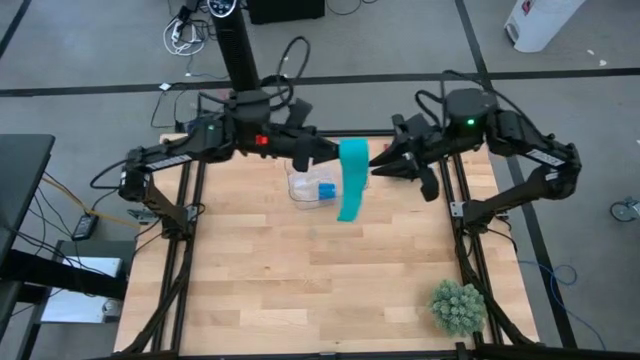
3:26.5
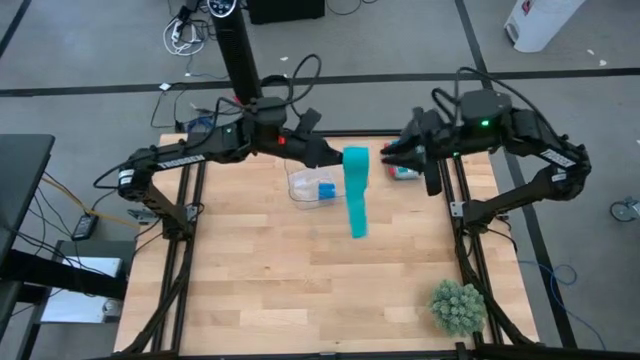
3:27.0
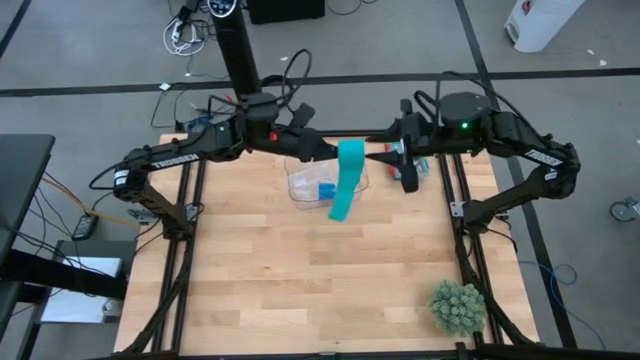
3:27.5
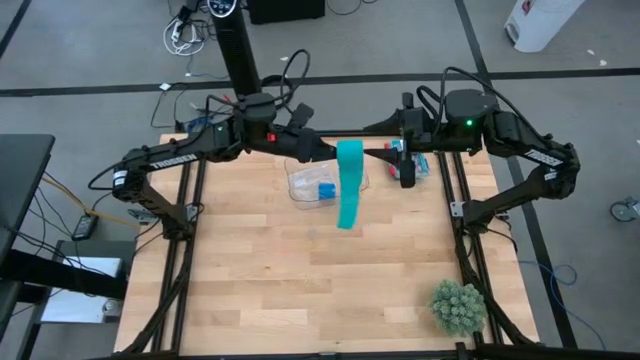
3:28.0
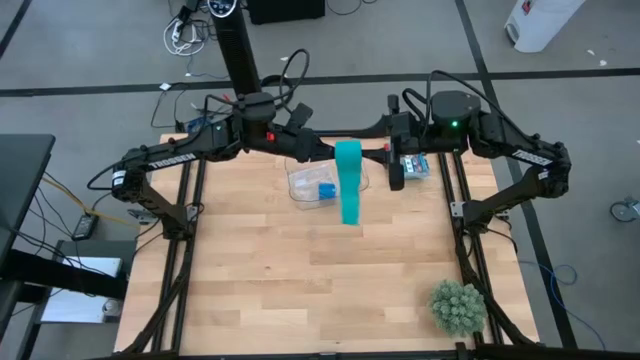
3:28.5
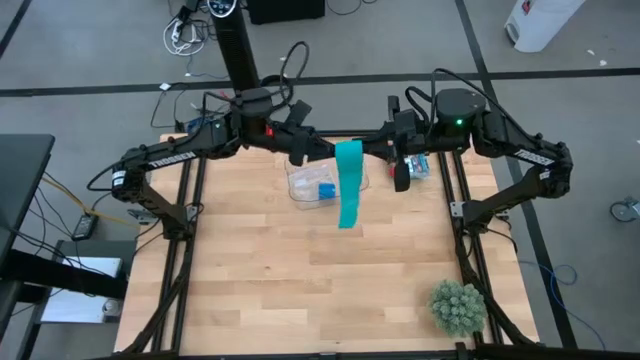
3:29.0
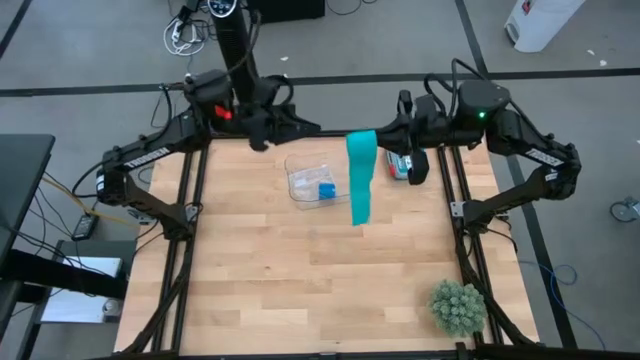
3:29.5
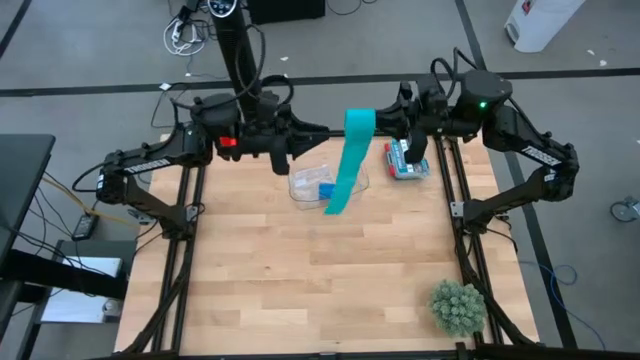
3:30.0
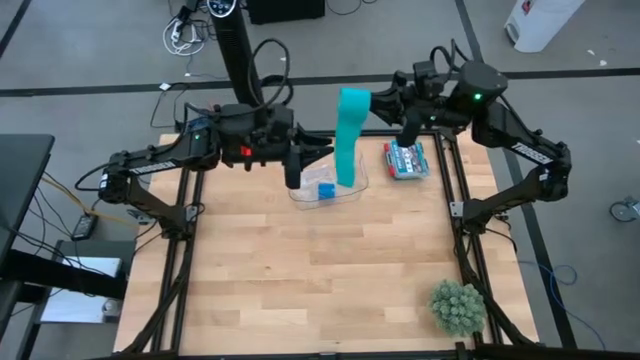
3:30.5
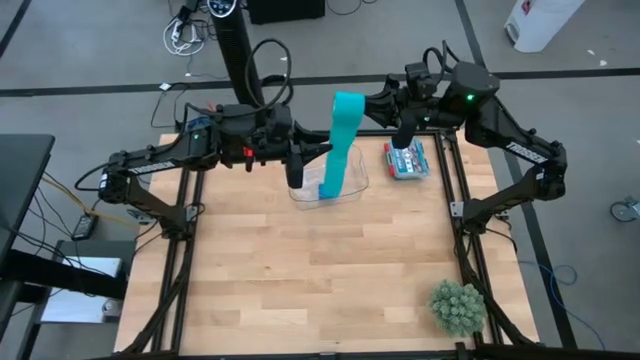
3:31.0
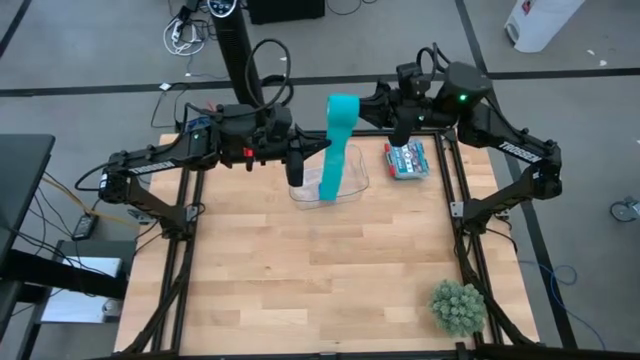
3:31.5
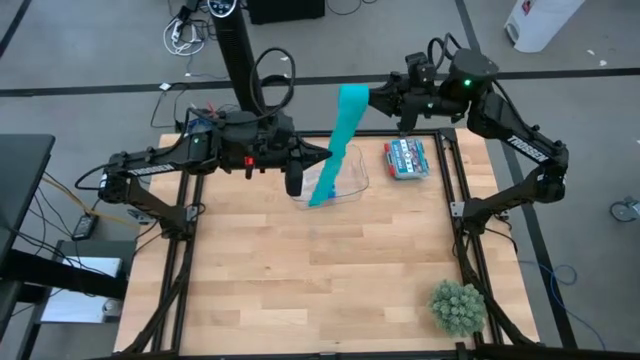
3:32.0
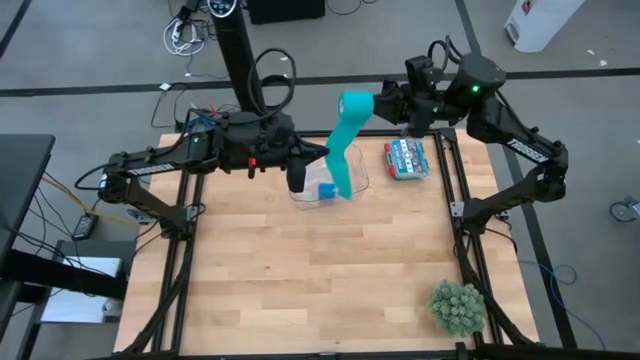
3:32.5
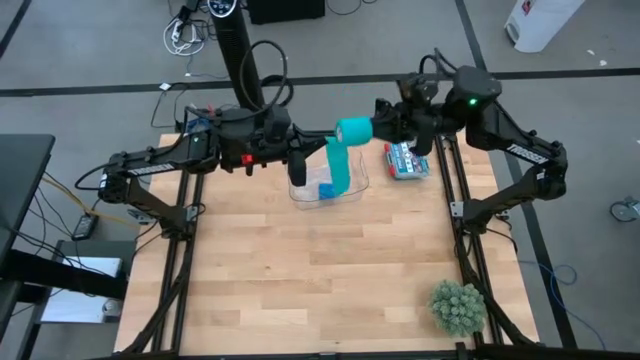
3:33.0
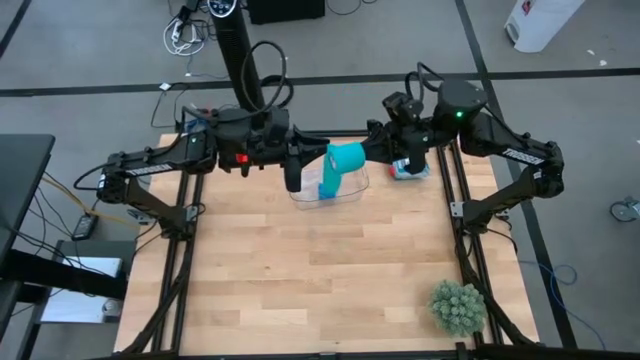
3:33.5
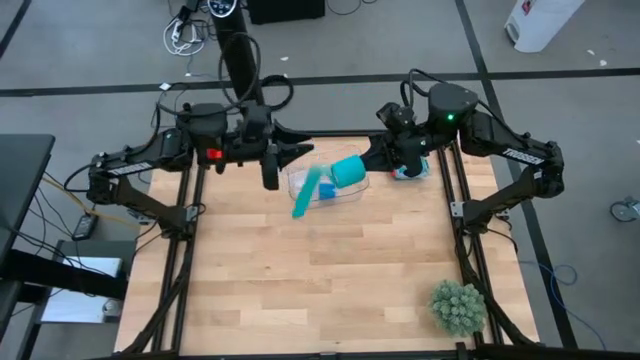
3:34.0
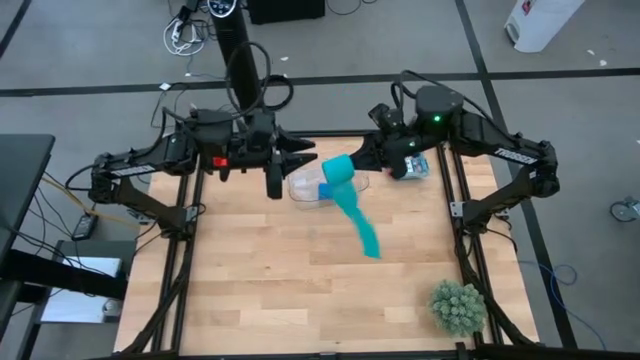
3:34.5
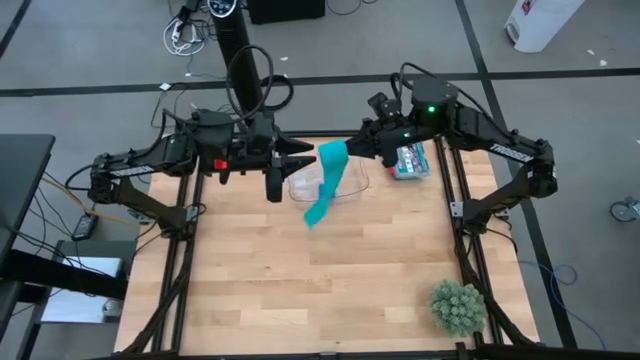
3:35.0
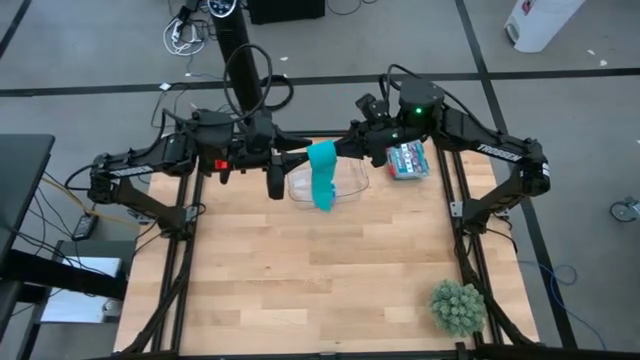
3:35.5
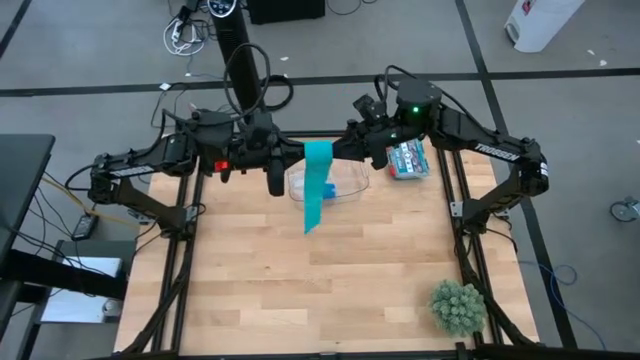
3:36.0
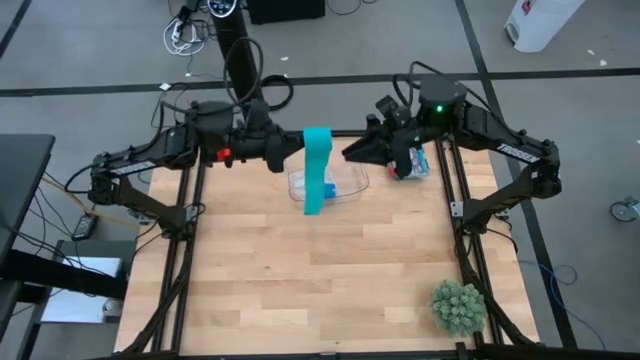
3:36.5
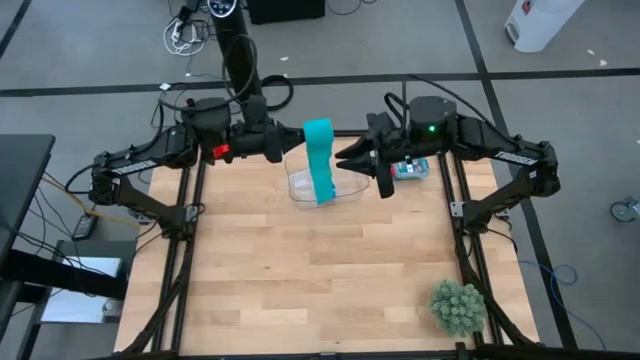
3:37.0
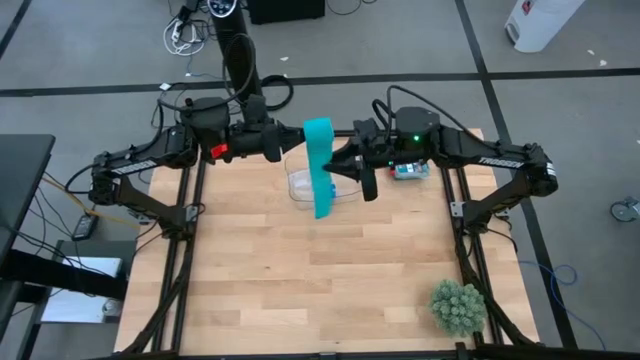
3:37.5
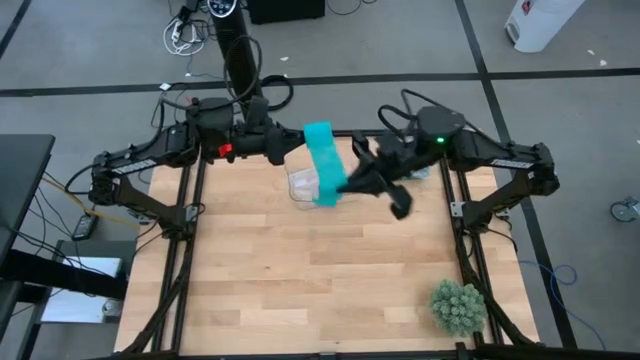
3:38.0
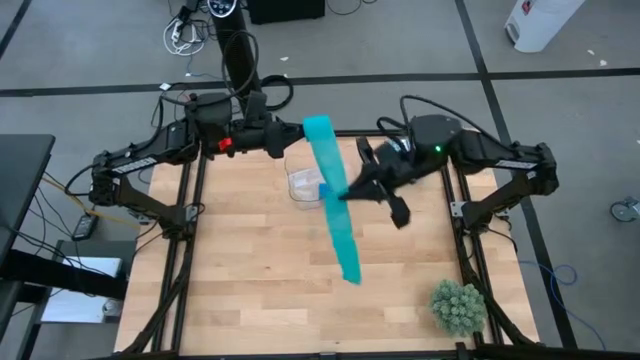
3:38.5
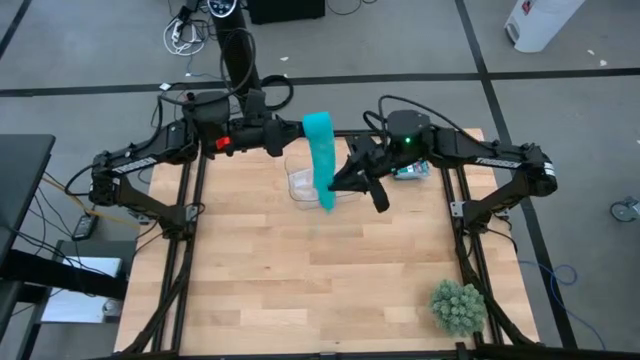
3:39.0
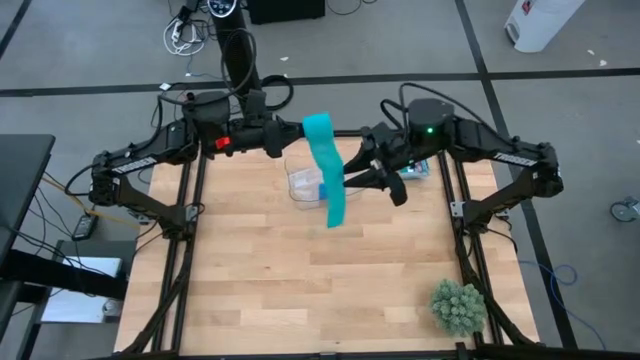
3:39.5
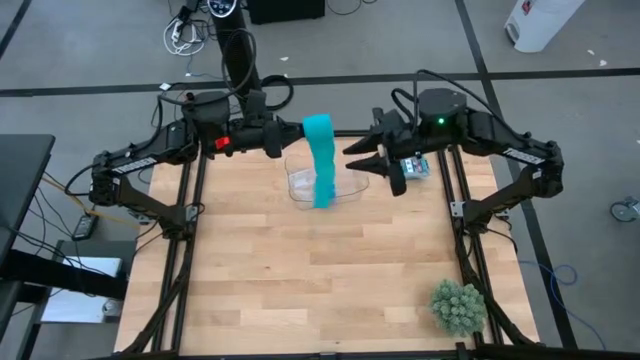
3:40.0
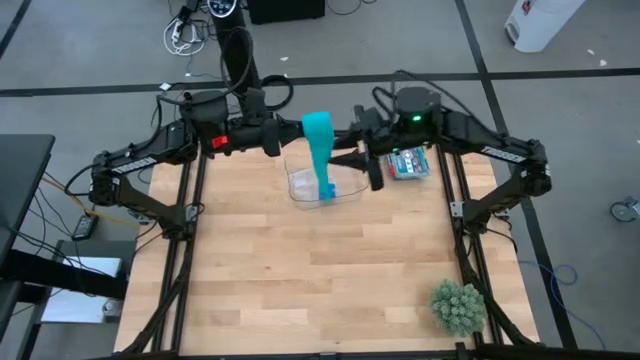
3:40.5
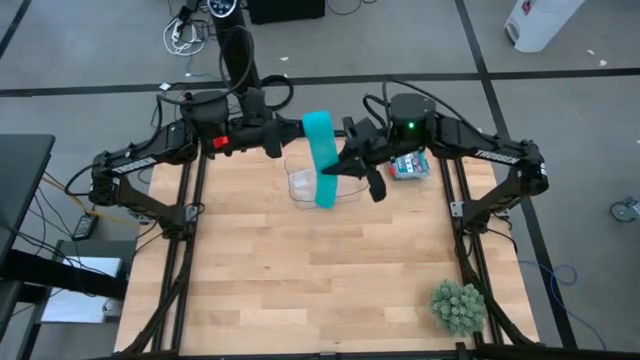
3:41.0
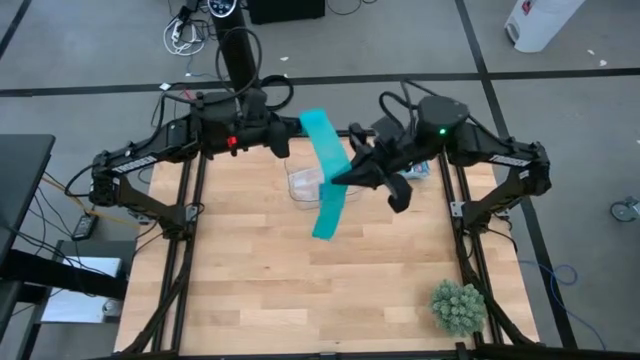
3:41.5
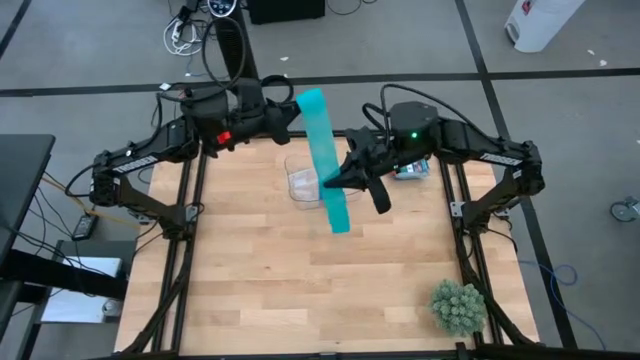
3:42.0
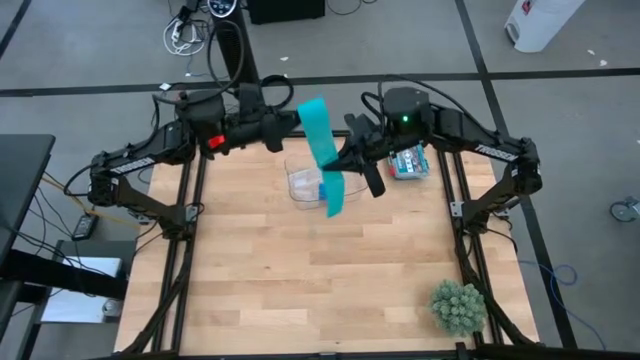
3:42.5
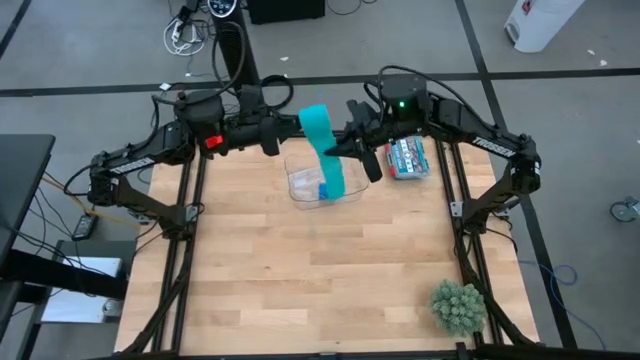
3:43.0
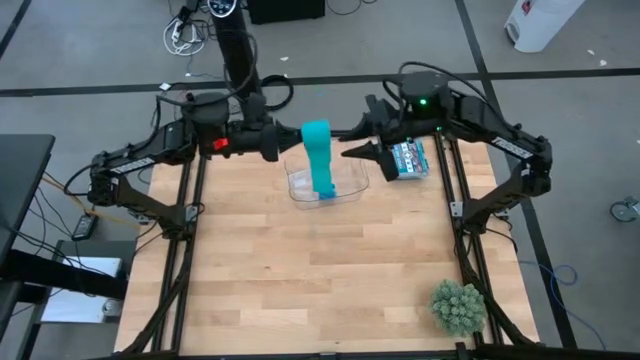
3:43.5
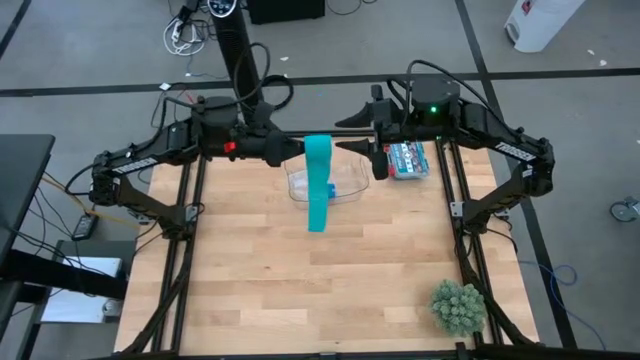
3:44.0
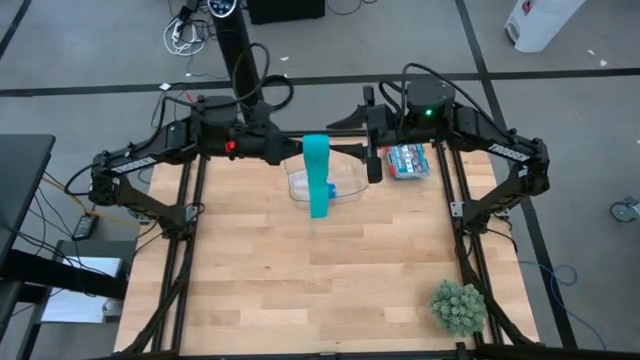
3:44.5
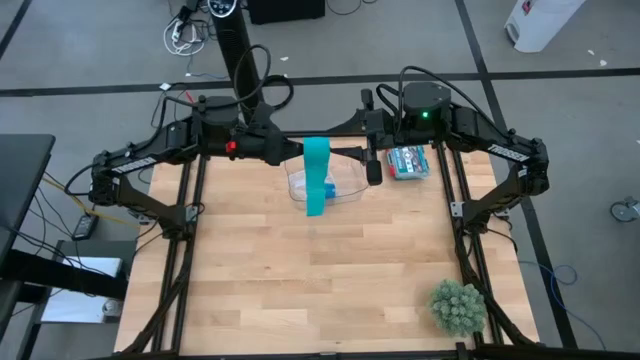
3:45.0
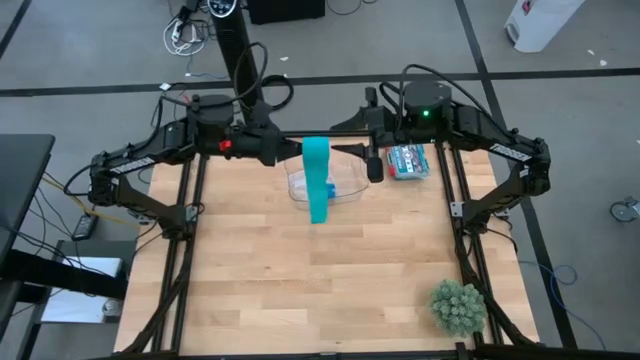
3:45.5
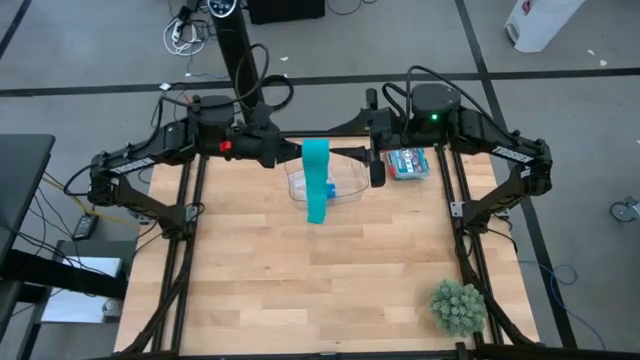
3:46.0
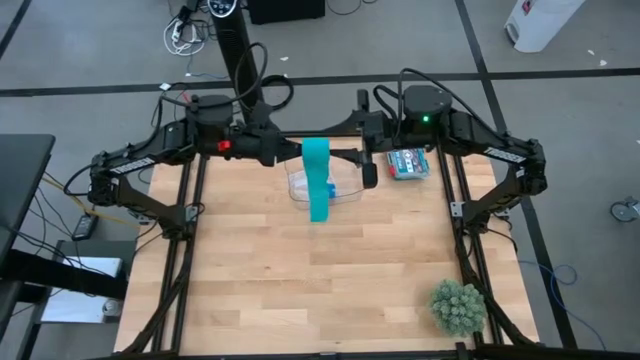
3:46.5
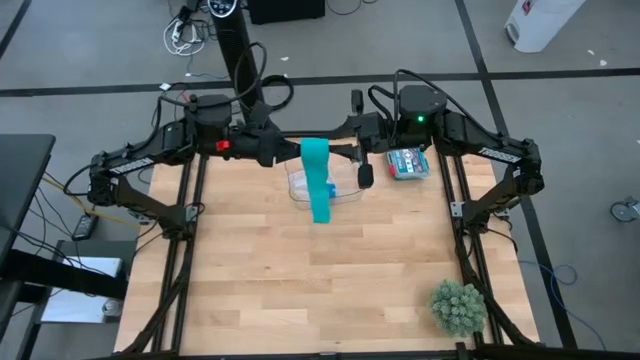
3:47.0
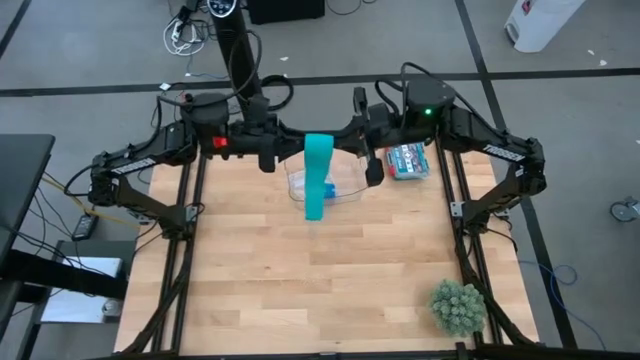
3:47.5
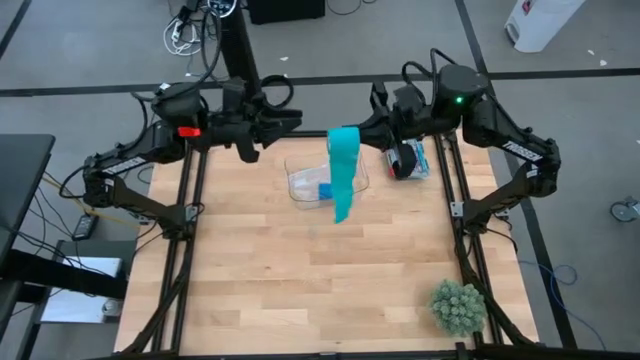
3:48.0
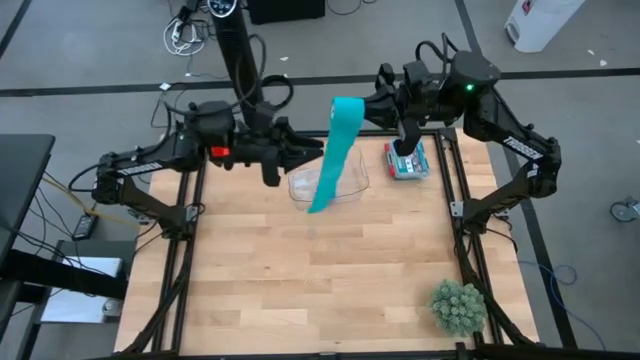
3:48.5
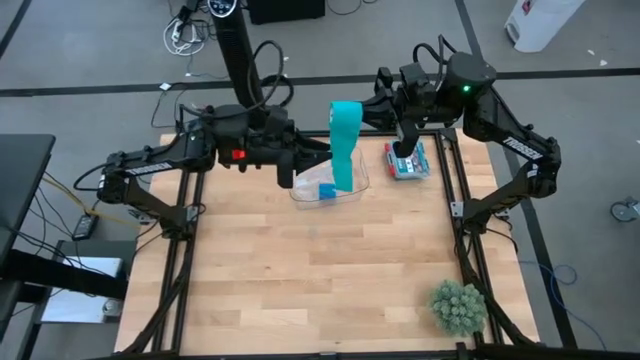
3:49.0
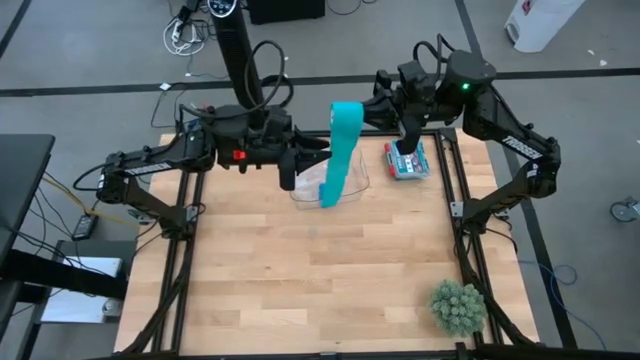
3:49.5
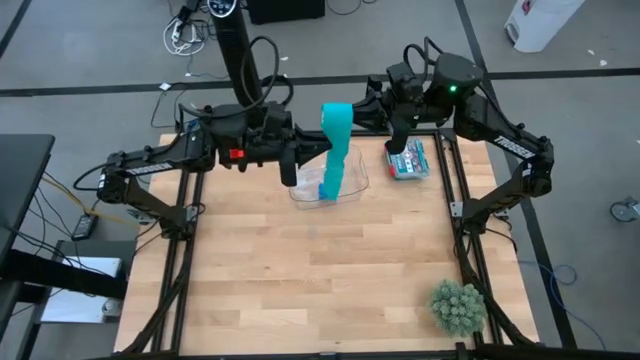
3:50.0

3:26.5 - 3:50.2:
Task: Roll bandage
Roll the sky blue bandage
